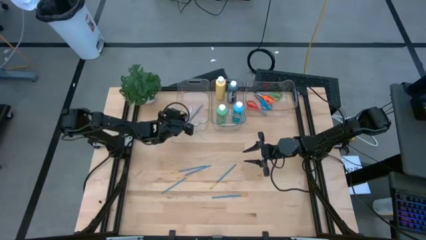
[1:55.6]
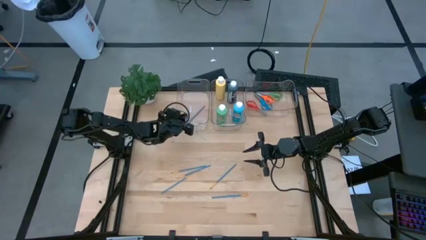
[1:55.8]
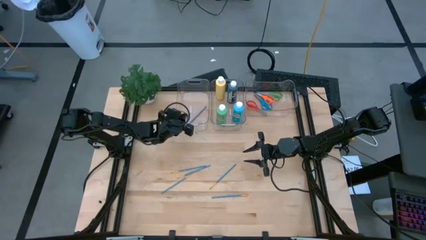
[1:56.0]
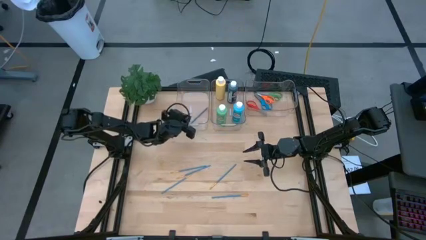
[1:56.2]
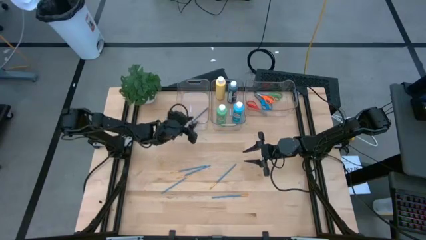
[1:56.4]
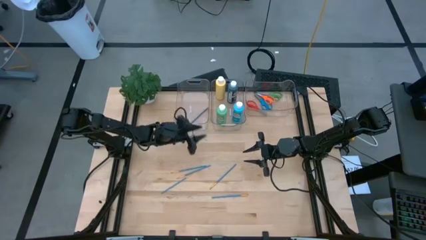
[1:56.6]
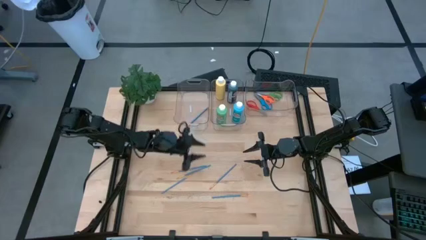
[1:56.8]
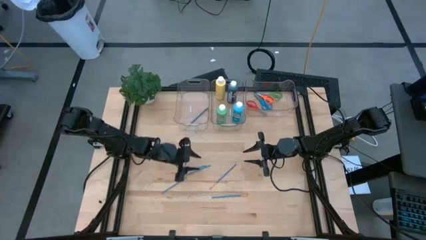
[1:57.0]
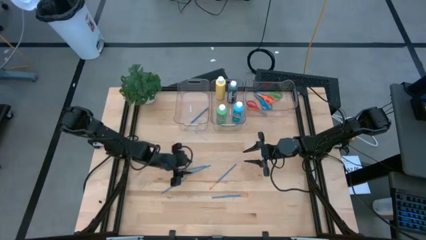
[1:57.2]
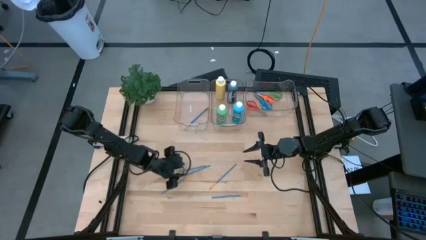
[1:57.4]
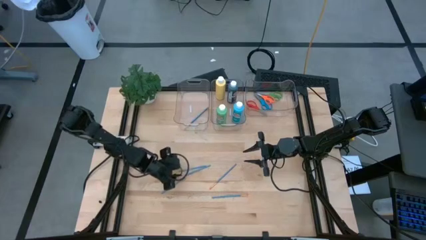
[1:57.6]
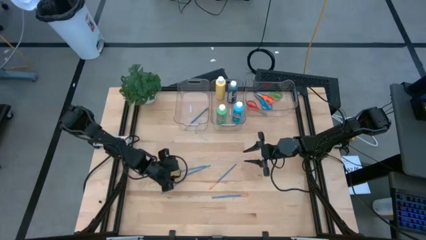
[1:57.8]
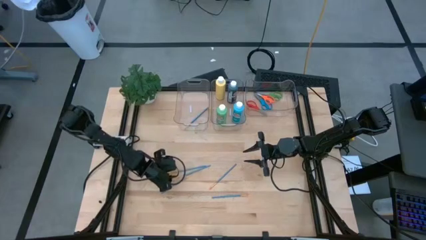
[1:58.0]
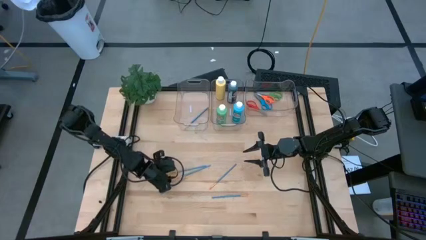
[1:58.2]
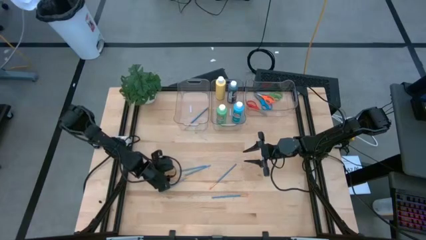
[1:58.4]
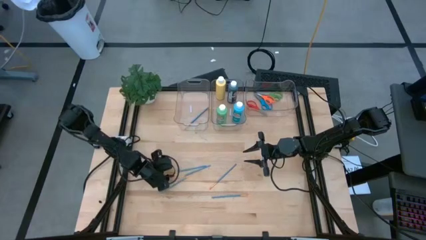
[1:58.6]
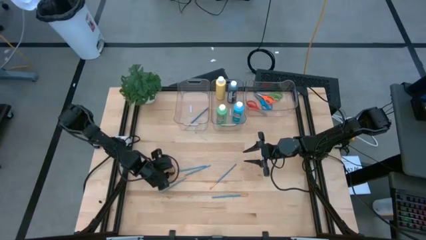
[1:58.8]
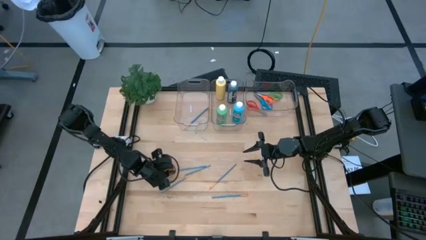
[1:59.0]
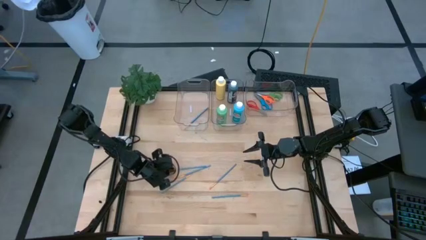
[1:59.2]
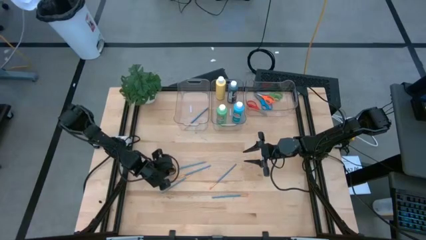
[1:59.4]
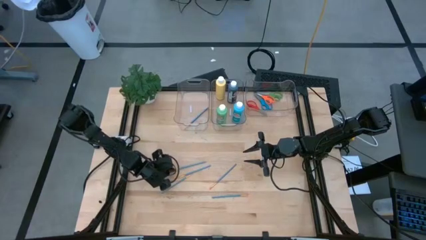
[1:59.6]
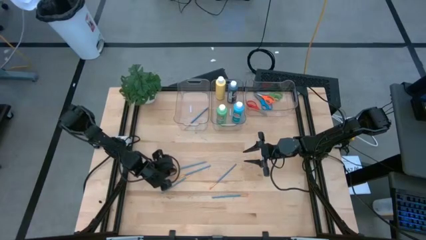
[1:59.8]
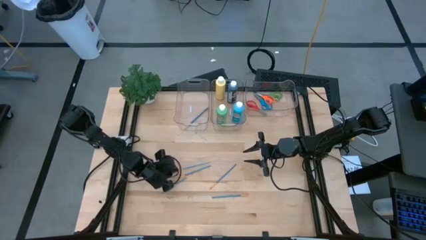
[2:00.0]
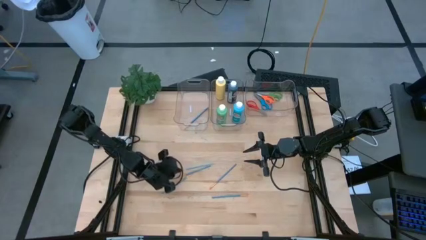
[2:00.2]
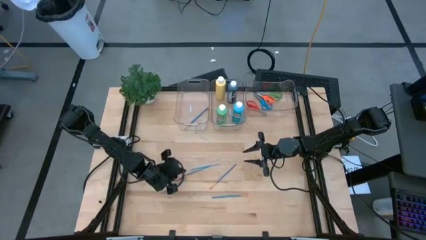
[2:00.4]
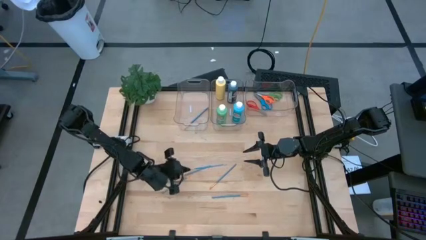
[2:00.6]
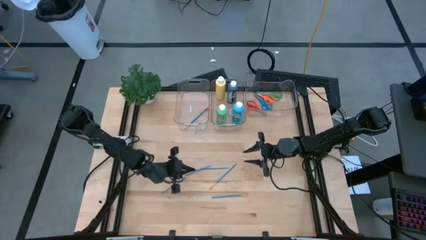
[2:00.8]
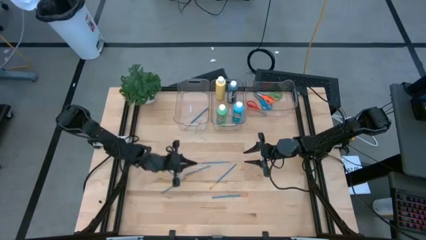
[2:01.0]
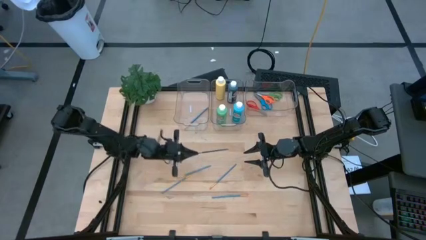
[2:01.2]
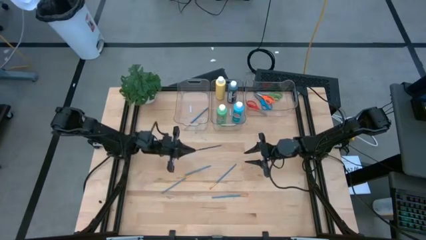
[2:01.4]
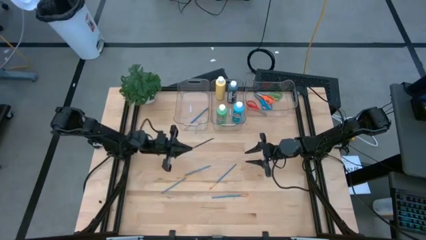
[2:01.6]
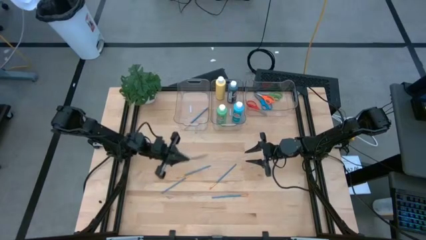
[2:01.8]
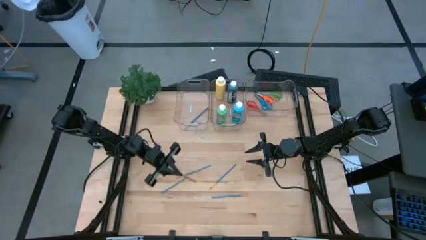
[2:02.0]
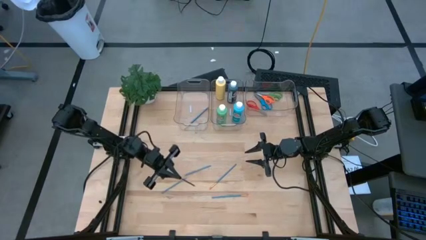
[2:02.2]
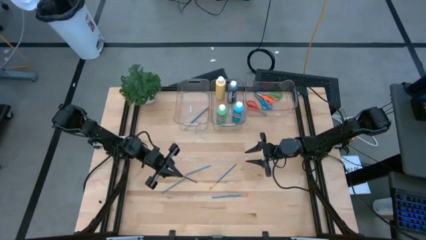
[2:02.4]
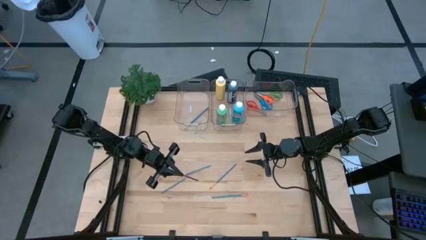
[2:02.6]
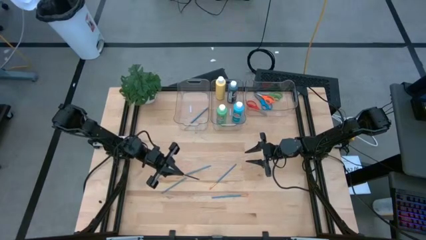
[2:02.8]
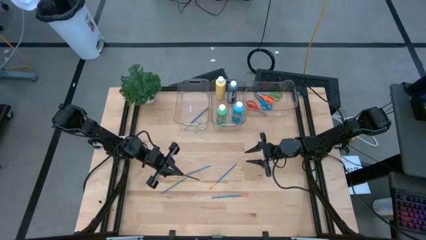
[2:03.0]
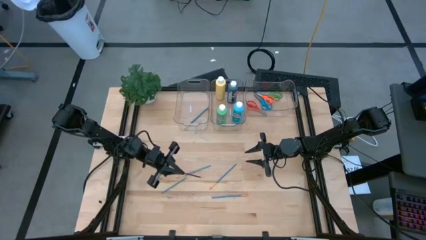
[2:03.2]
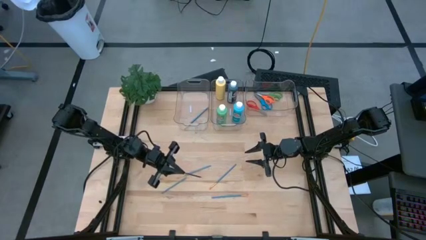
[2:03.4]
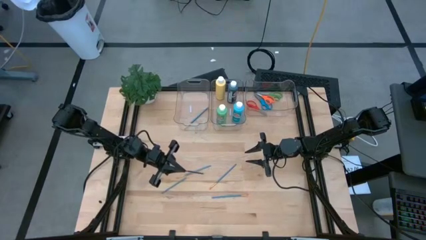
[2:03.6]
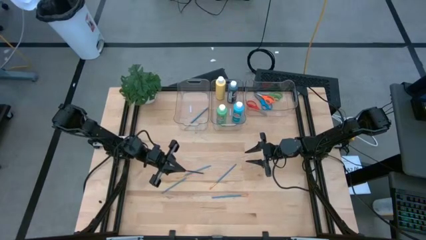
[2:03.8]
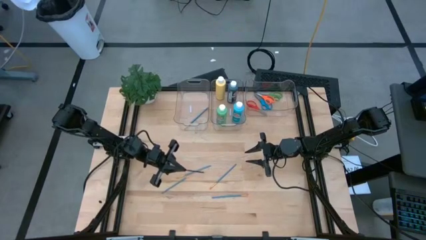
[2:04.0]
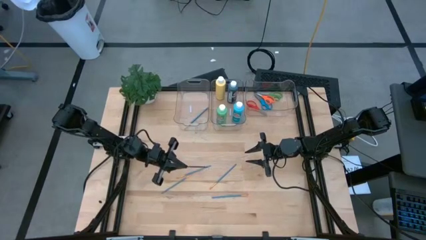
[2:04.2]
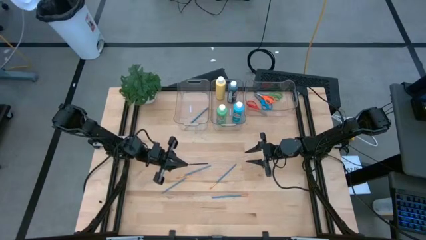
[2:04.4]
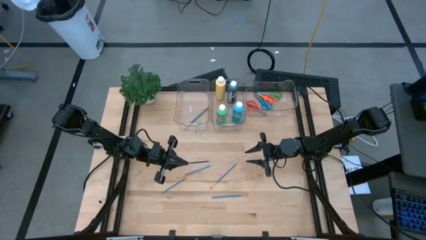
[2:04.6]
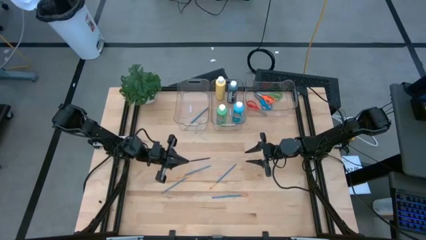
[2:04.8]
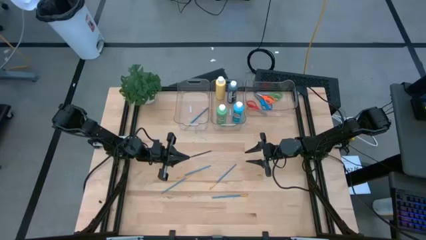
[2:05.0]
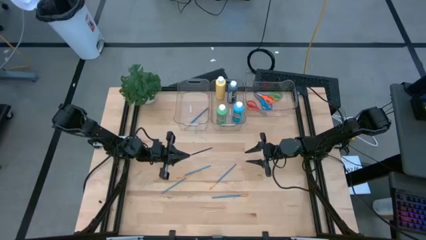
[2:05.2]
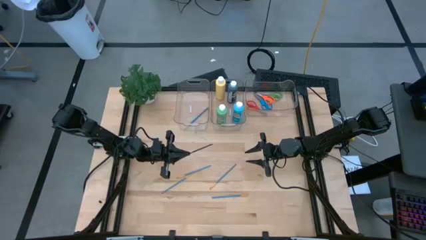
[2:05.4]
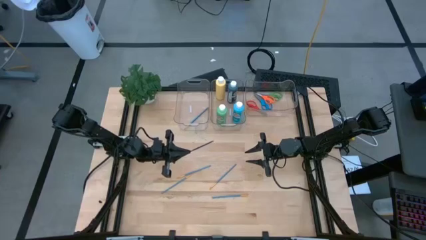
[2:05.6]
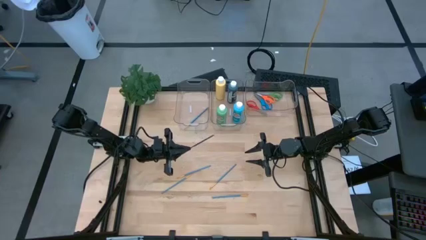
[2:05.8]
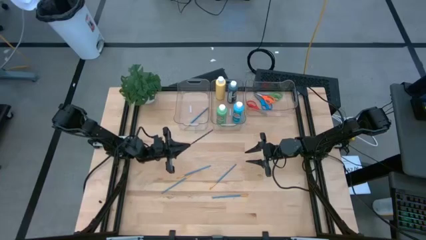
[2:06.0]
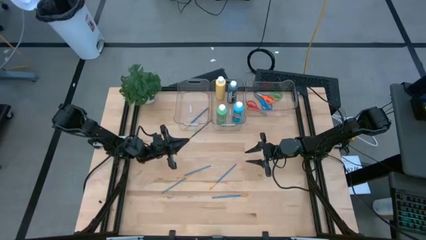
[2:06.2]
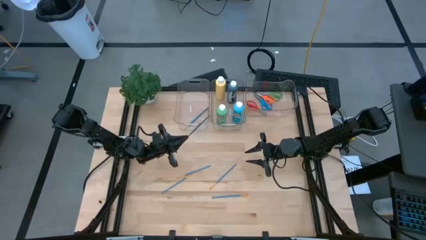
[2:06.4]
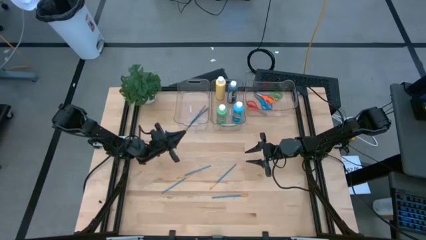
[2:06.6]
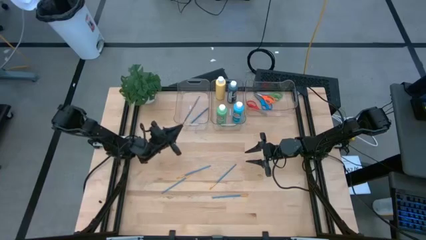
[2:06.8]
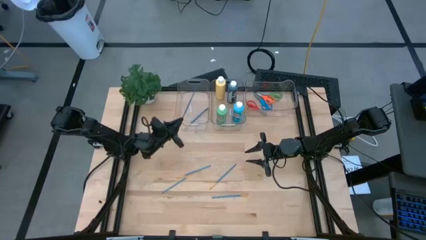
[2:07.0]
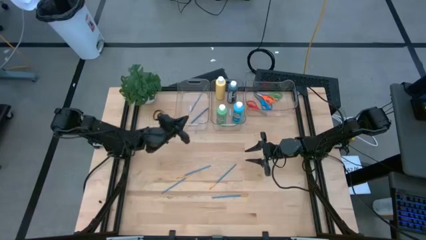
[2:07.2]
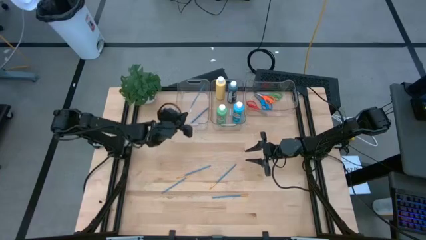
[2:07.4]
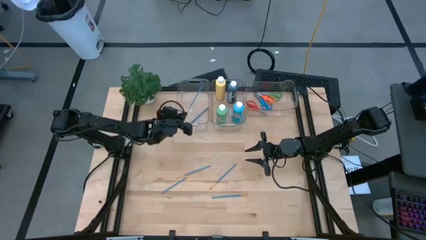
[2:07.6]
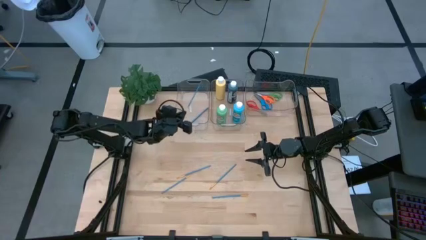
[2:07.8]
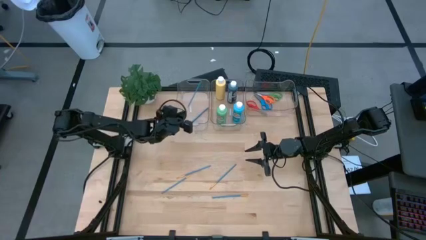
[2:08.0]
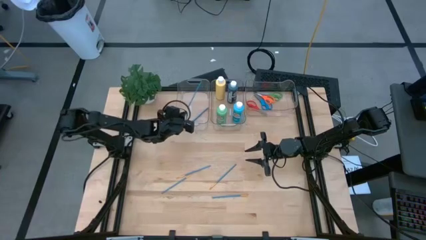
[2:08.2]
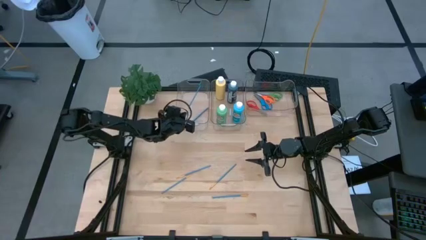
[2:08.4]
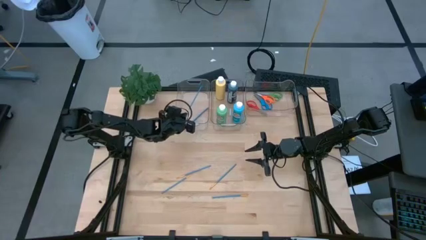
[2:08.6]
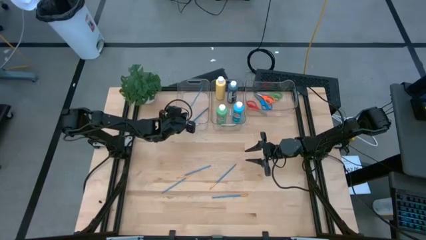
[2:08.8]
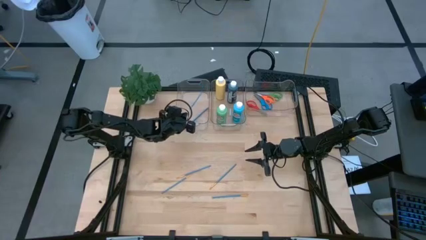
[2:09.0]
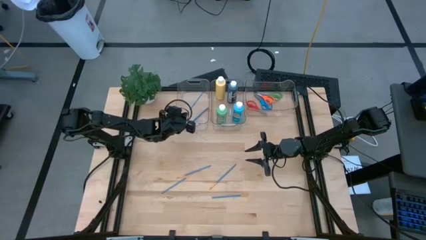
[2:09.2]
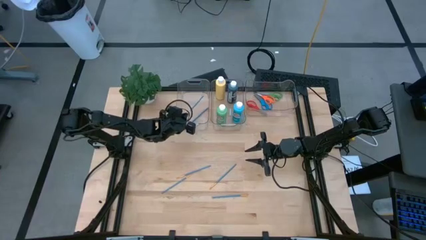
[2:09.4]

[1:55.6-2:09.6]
Task: Pick & Place Paint Supplies
Put the blue paint brush into the left transparent bin

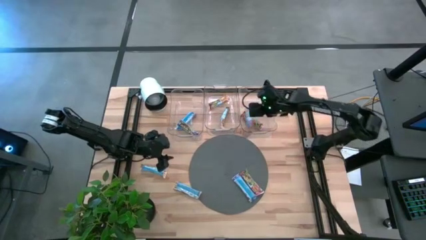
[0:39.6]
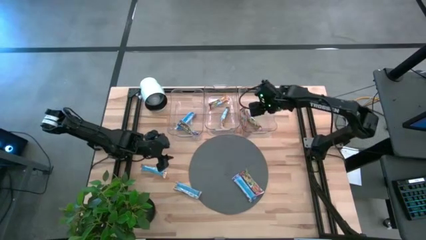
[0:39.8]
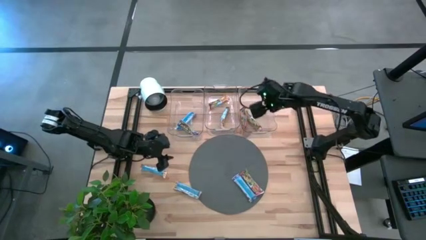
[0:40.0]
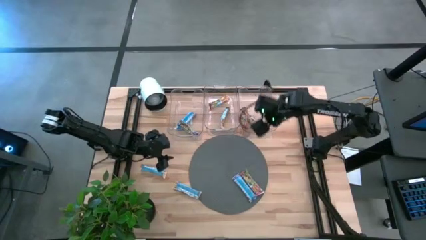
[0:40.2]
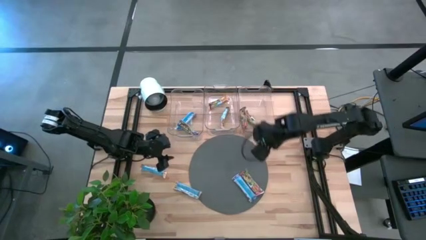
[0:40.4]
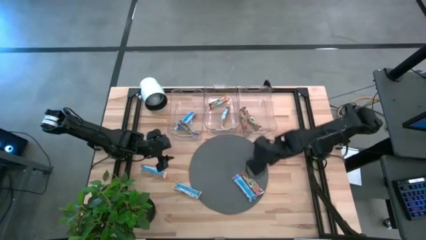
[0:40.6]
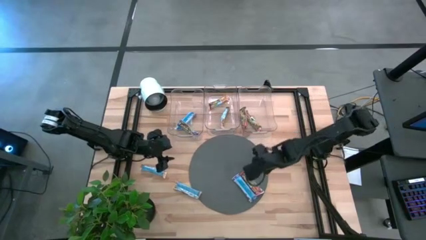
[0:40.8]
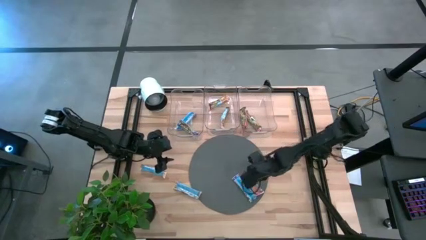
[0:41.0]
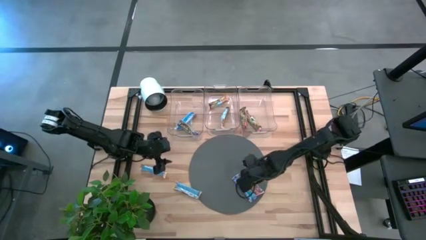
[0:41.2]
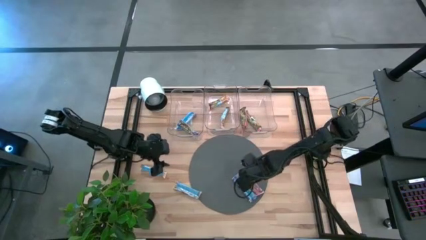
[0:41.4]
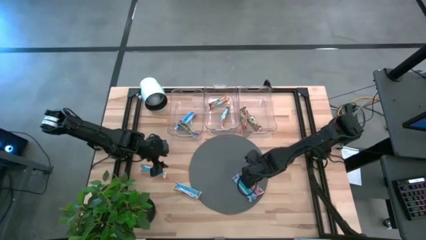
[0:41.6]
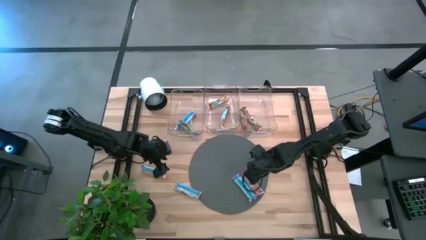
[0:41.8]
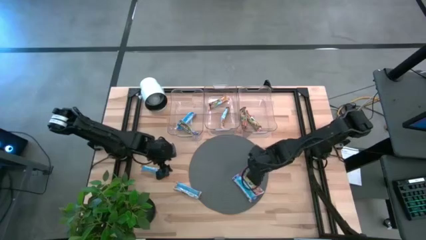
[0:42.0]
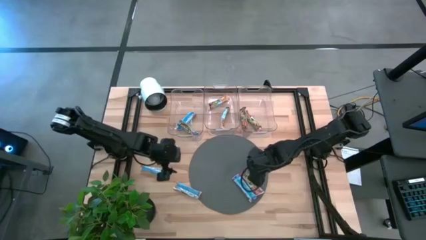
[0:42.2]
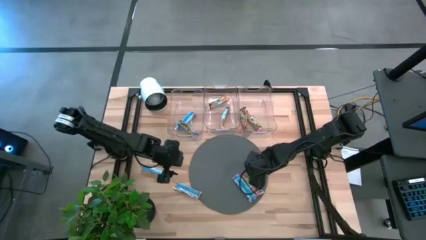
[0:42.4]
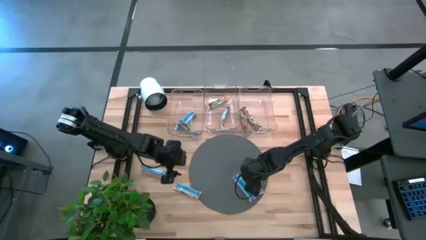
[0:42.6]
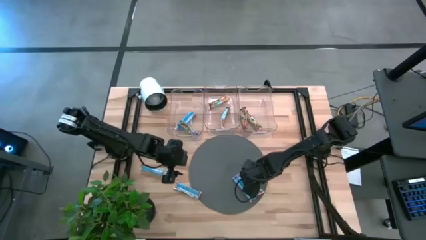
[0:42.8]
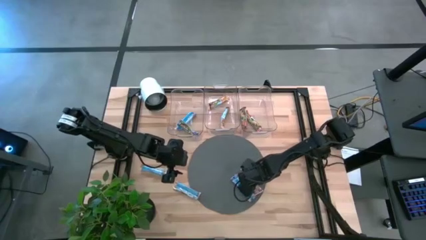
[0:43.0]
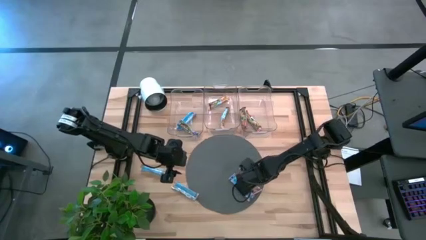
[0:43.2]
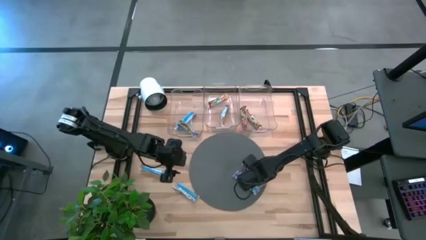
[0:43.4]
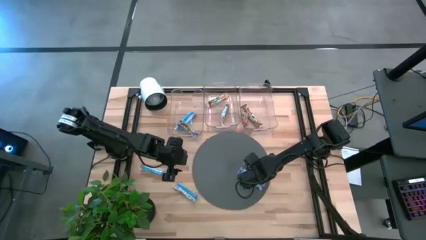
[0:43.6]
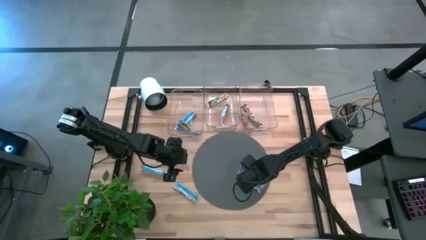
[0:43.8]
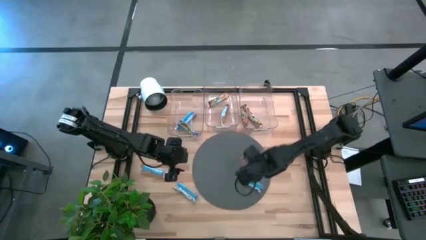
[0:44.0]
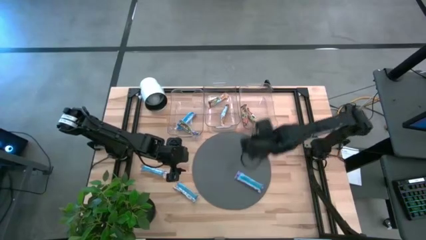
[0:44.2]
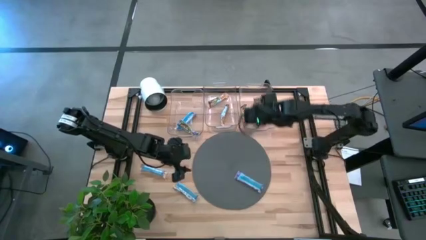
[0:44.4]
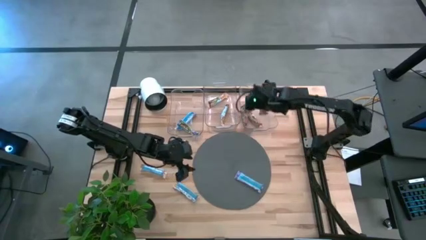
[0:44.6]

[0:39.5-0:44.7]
Task: Pick and place Granola Bars by type
Put the red granola bar into the right bin
